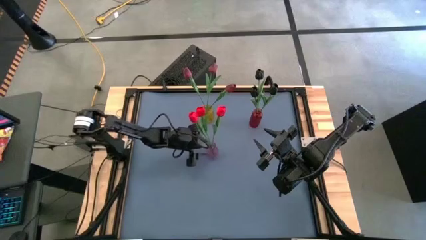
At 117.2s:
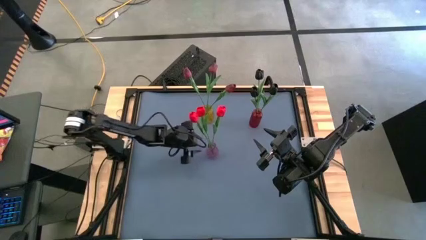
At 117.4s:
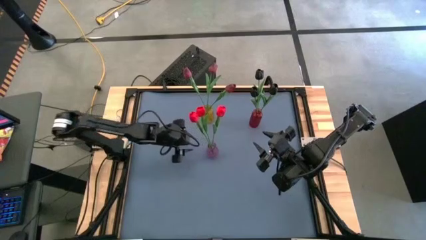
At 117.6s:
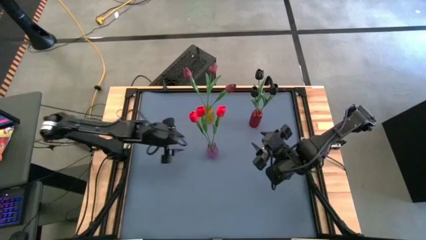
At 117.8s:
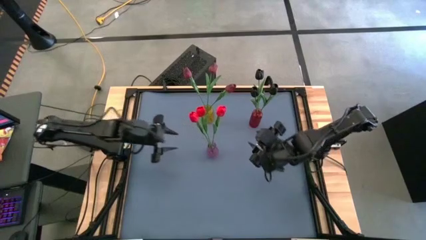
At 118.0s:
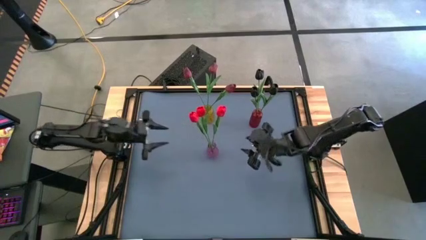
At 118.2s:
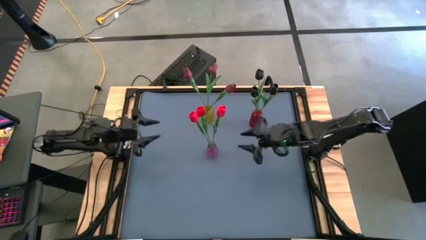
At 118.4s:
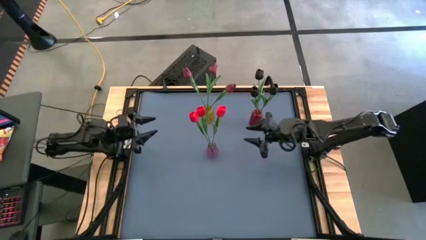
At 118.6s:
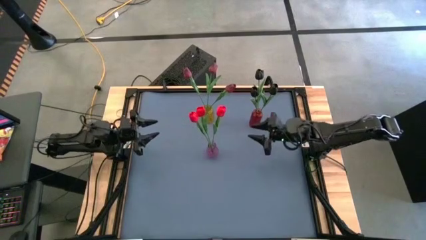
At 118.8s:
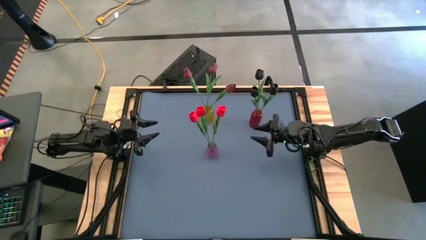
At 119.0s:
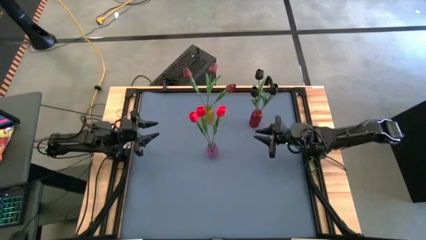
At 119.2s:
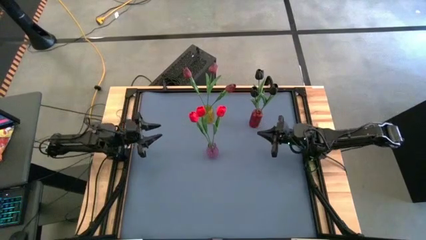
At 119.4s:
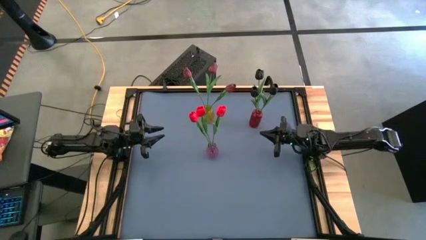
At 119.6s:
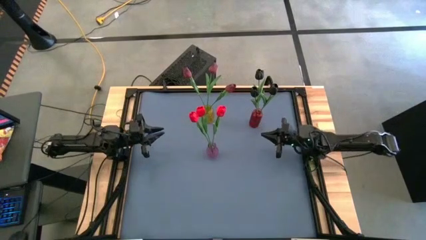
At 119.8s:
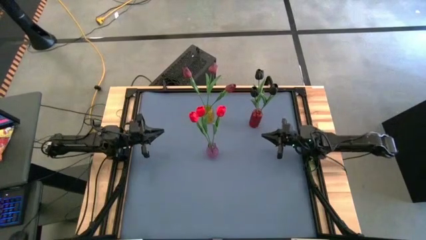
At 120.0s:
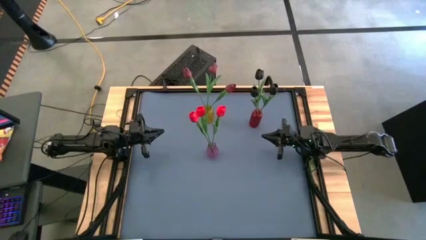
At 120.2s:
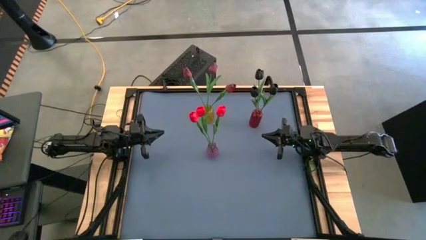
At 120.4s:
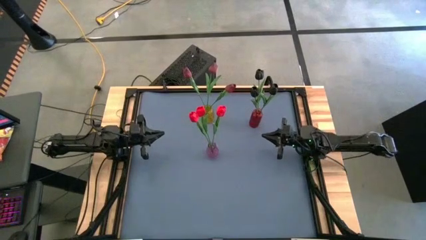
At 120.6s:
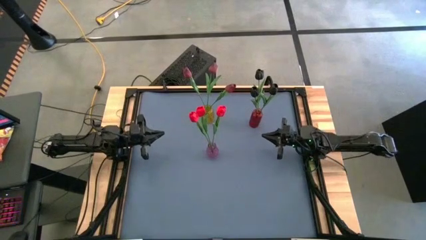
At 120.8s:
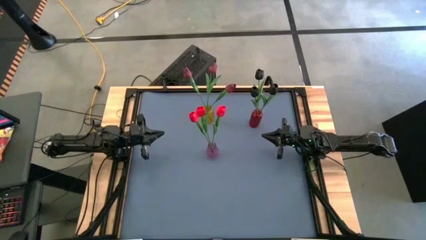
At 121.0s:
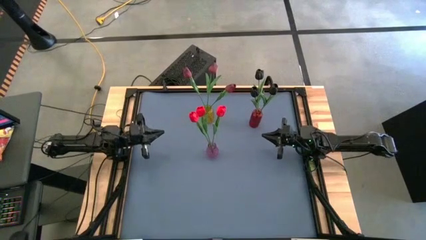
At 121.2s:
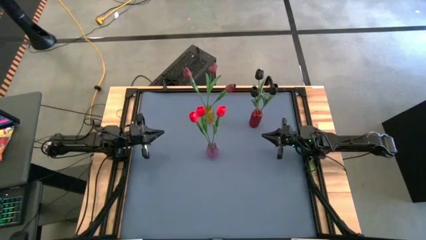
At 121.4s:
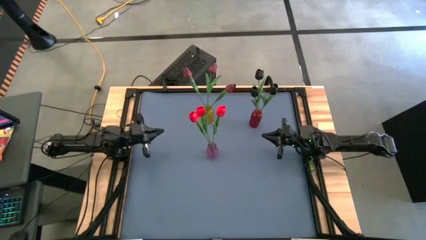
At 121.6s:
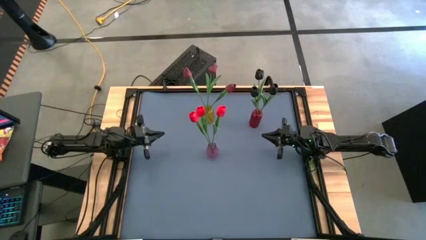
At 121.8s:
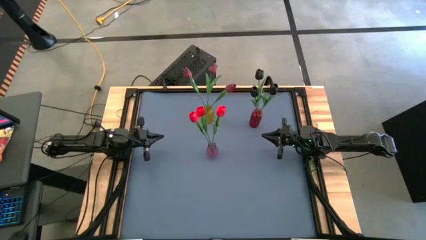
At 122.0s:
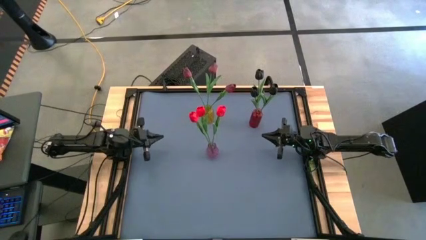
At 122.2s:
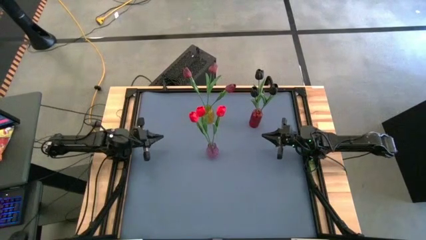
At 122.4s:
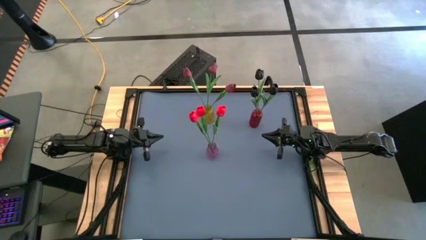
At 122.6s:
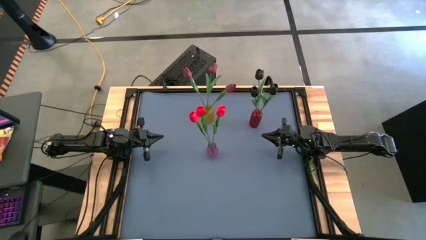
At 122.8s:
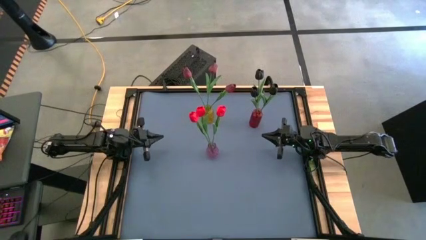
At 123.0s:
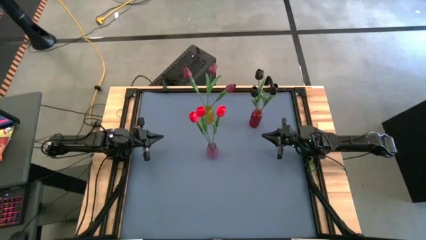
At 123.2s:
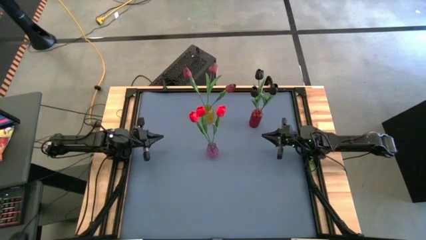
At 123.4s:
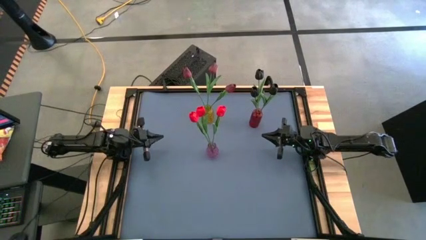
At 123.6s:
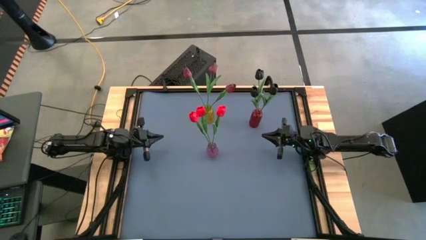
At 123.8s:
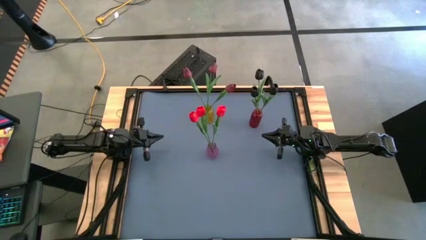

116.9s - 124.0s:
Task: Sort flowers into vase by color
Return to Home Position

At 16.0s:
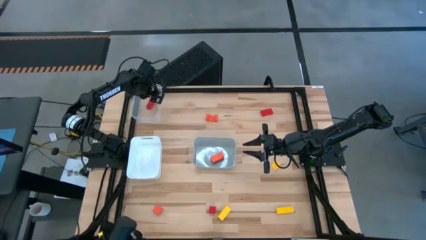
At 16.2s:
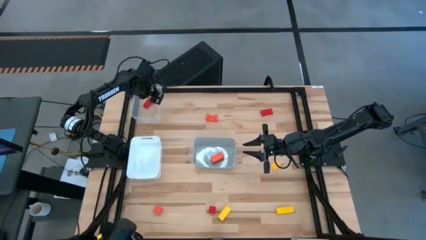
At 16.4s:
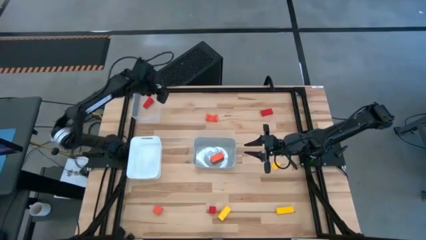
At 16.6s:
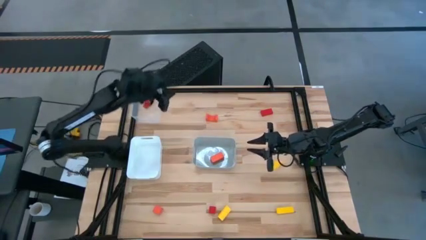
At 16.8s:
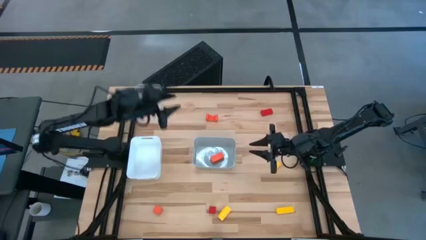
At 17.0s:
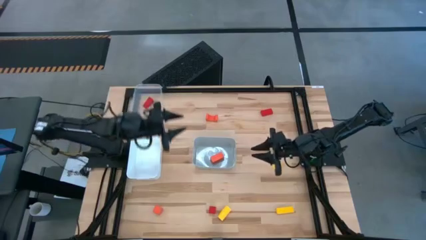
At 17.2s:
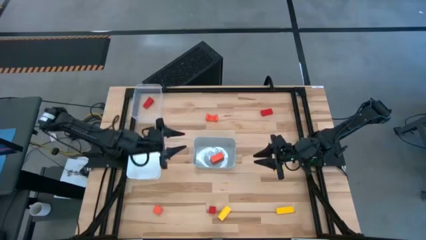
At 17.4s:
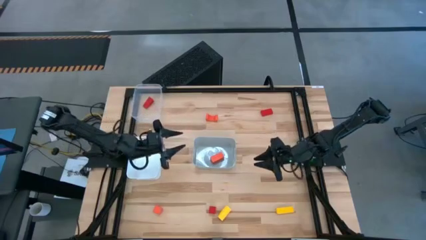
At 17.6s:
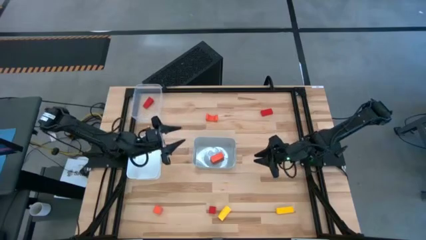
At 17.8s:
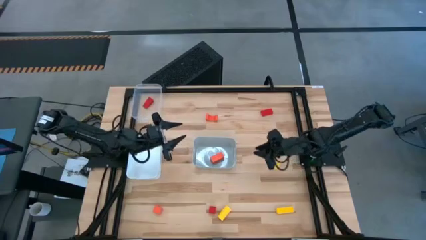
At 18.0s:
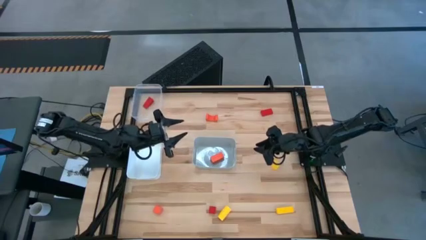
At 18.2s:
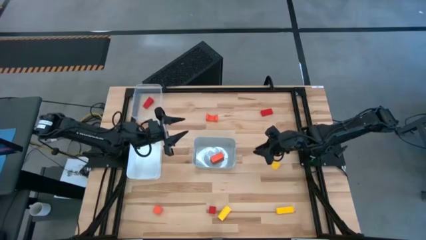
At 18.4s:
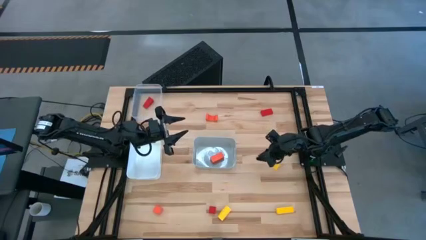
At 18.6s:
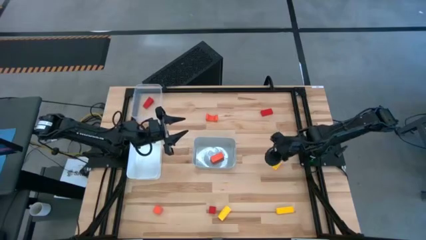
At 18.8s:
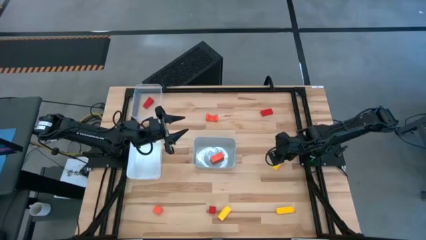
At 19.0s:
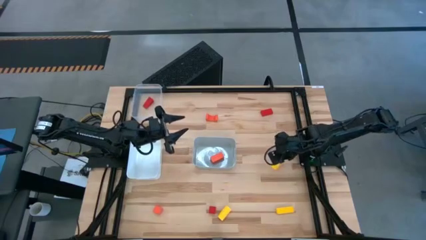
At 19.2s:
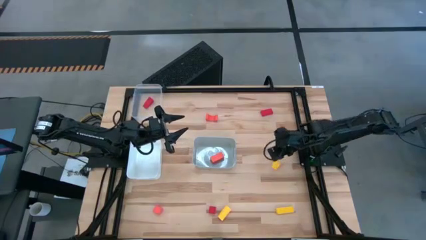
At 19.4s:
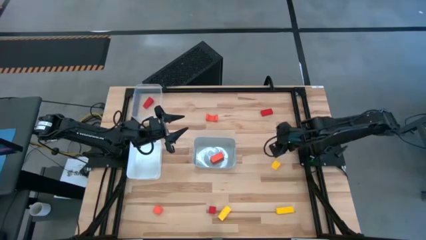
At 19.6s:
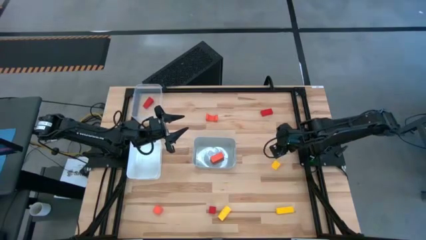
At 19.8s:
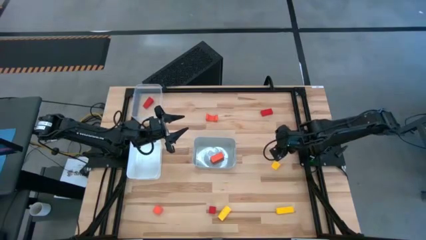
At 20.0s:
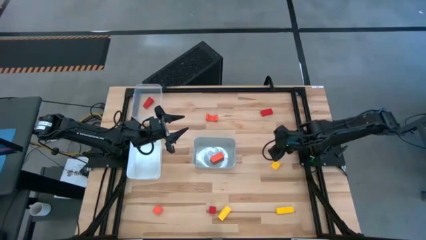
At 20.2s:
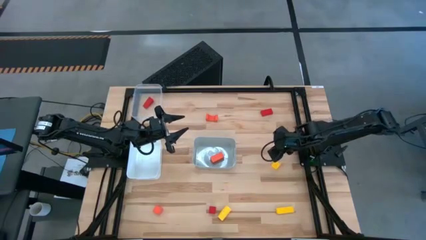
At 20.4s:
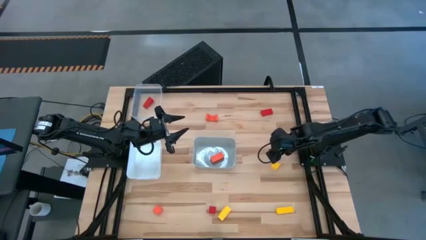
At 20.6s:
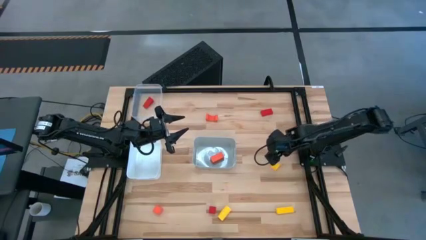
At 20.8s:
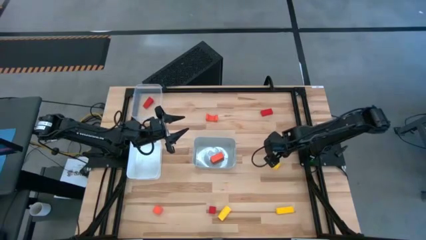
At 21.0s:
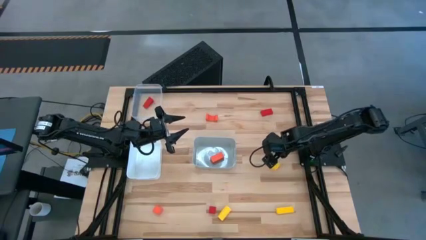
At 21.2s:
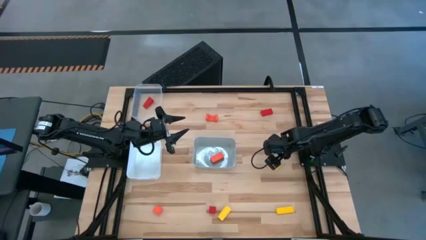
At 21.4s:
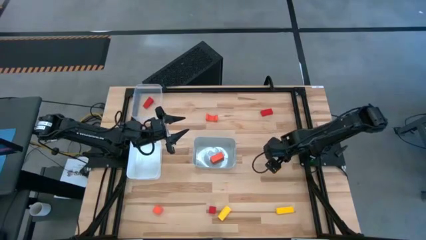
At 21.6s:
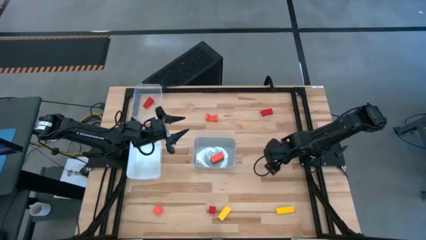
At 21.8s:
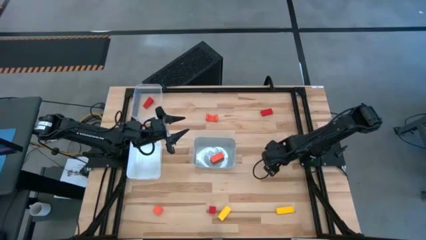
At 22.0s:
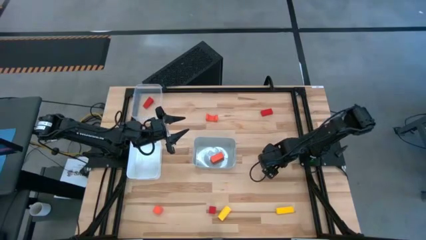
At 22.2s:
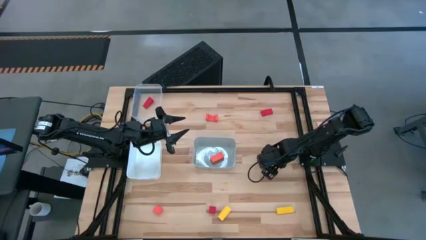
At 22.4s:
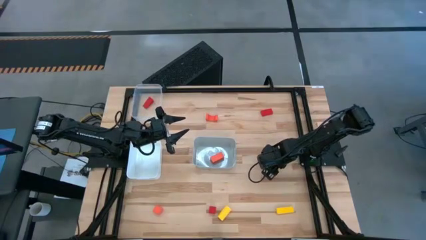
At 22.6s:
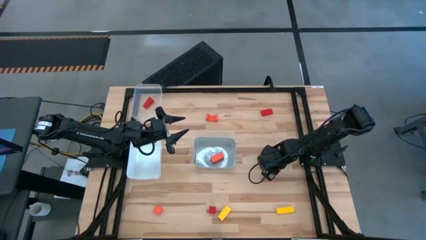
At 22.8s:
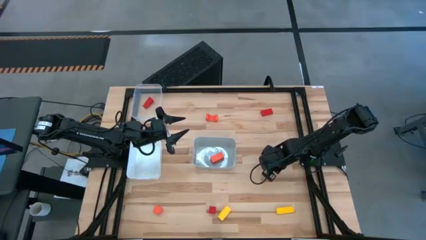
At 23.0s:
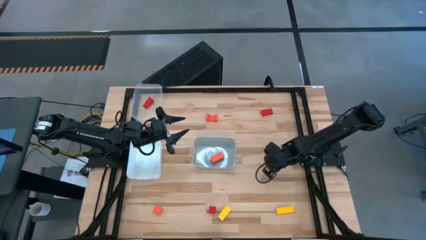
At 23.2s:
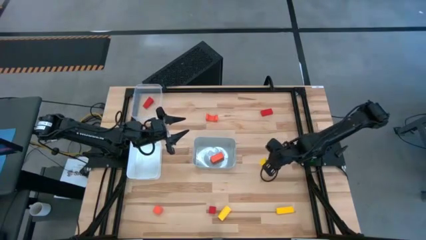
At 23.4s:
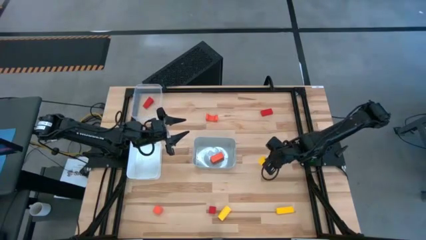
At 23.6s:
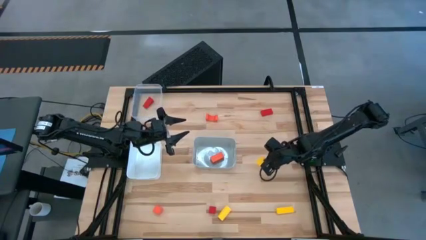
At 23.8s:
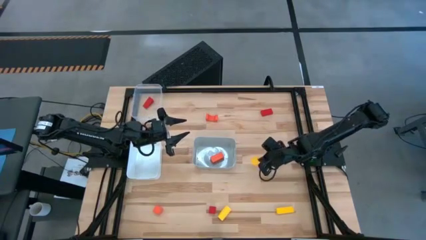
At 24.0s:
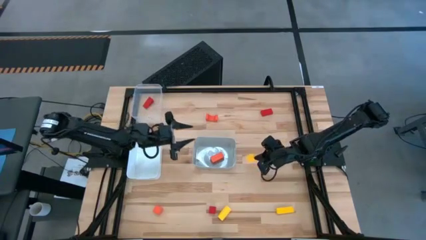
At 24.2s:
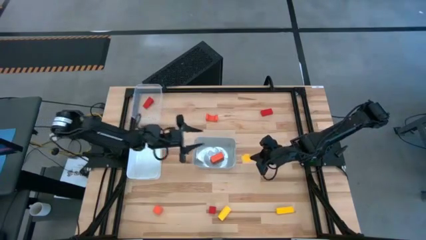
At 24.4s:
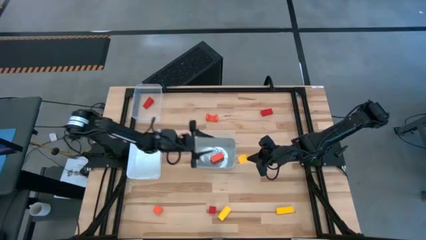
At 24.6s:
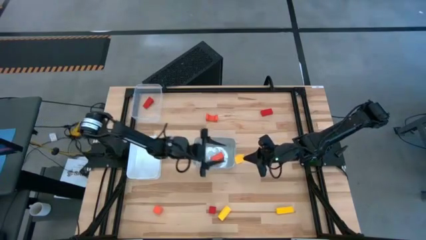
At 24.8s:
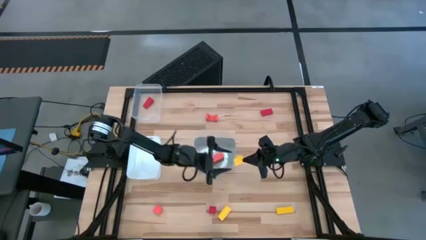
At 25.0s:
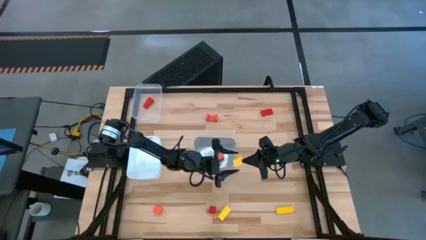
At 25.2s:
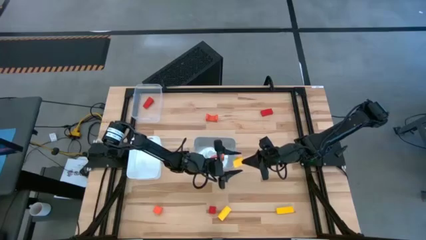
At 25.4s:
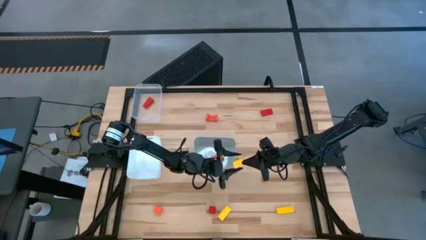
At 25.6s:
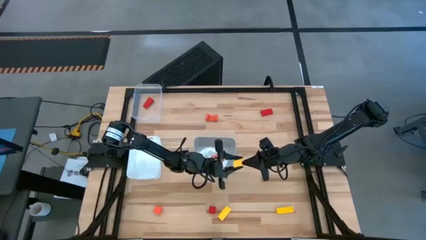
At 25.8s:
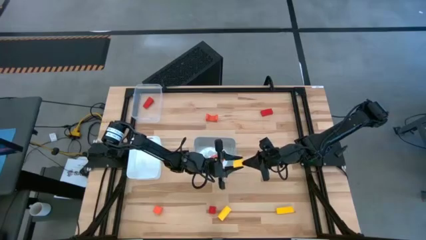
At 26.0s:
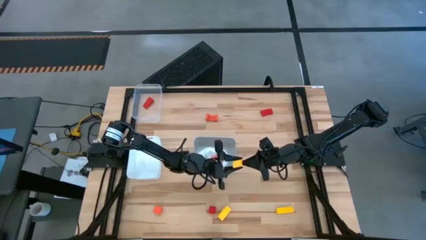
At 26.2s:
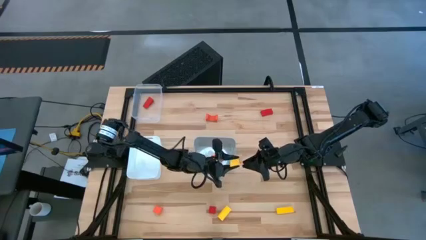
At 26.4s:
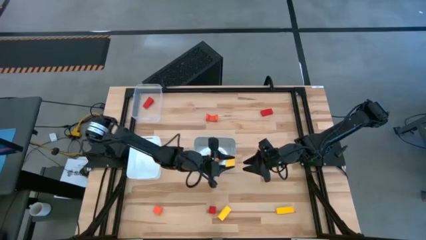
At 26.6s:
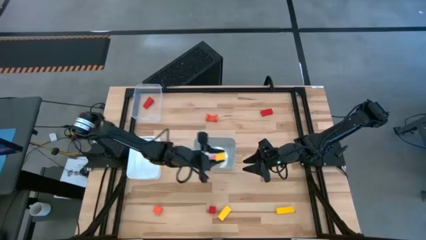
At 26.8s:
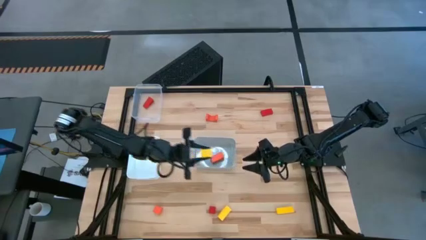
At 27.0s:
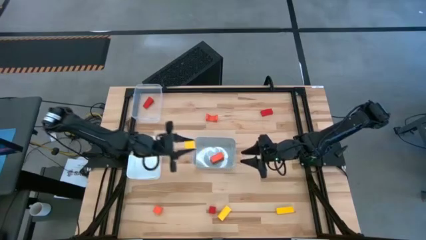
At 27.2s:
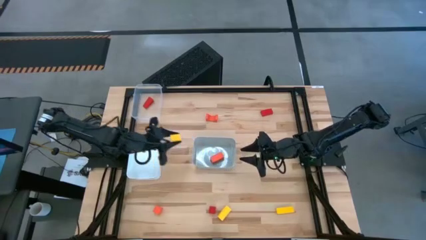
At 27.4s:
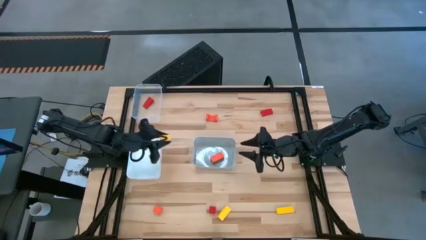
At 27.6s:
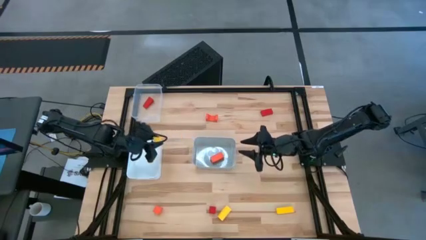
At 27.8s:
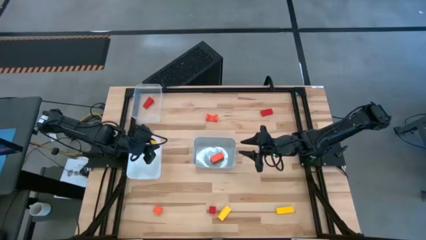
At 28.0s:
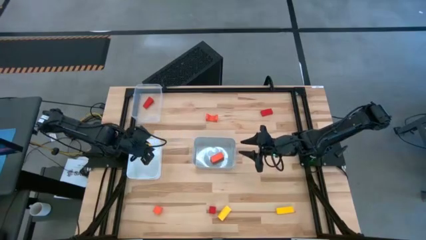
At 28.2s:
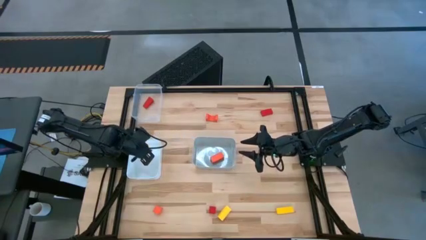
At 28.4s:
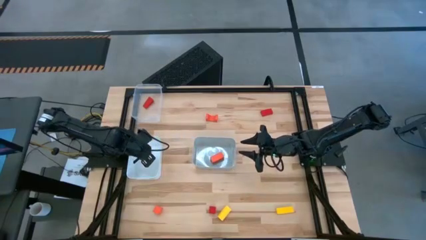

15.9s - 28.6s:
Task: Sort & place blocks by color
Put the top right yellow wooden block into the white bin
